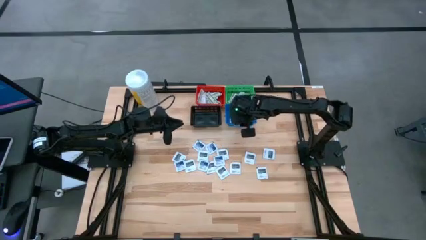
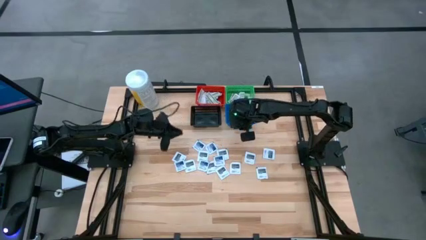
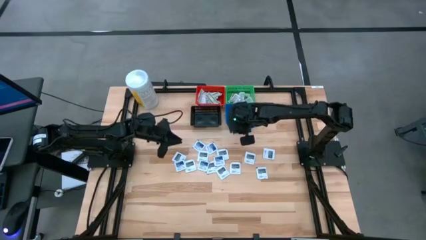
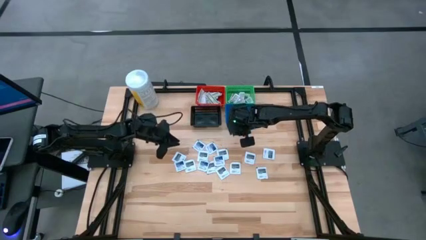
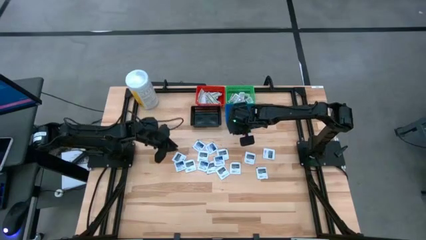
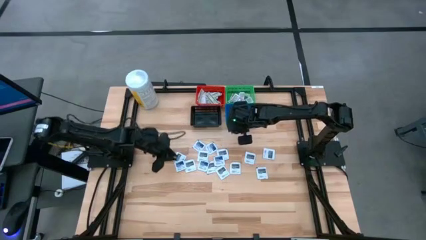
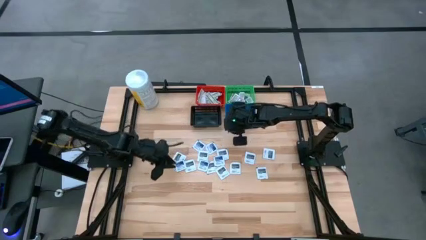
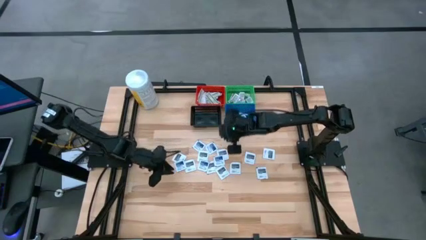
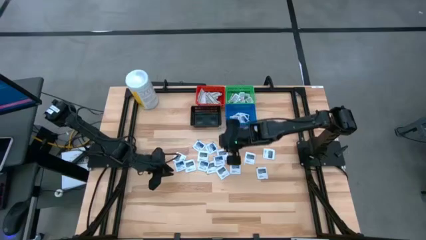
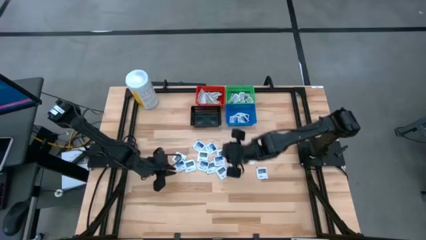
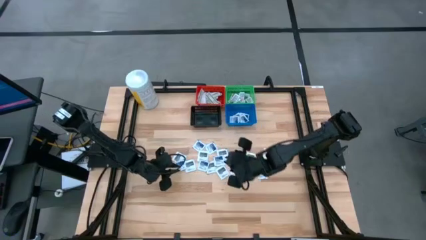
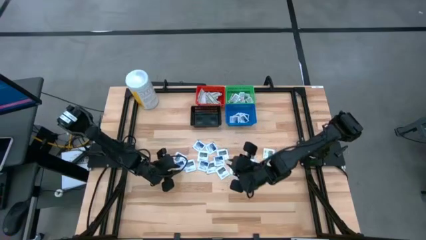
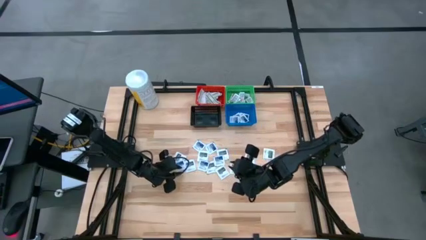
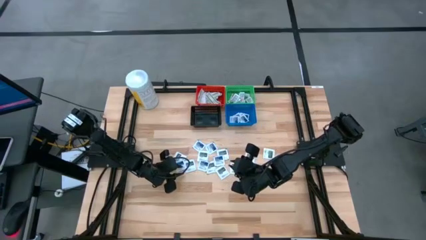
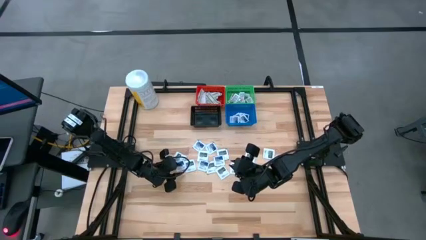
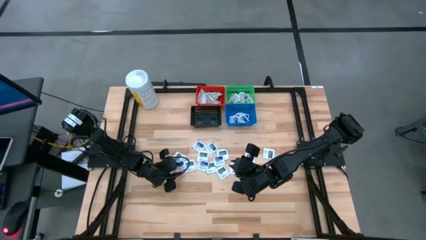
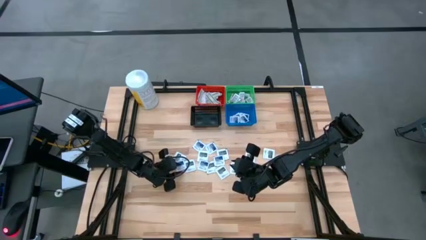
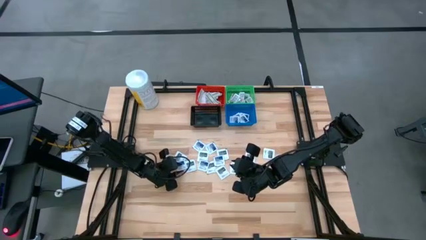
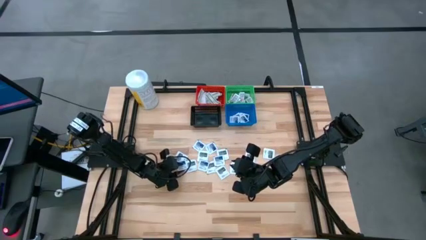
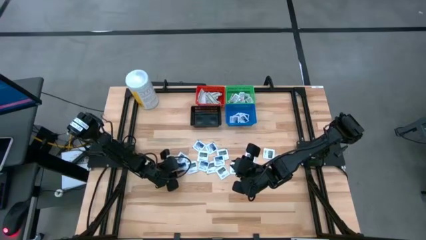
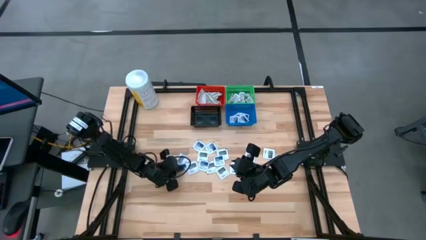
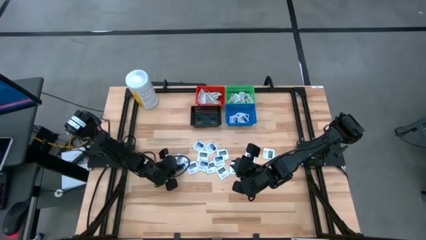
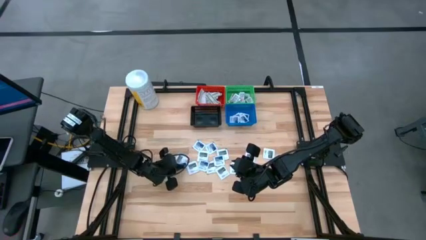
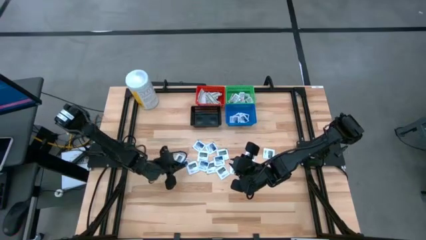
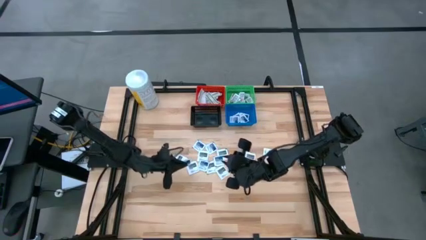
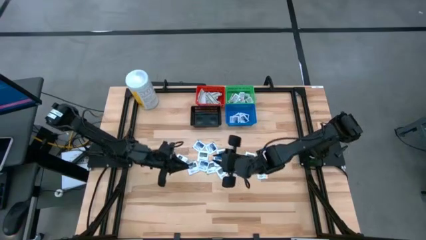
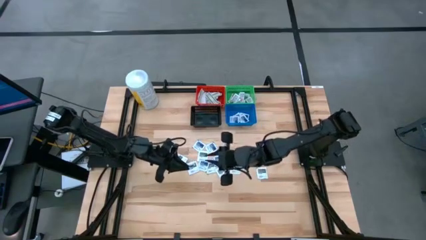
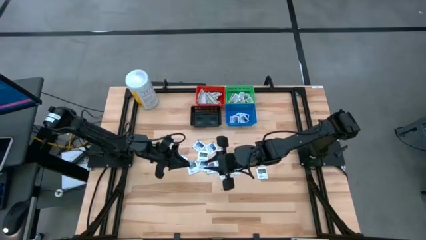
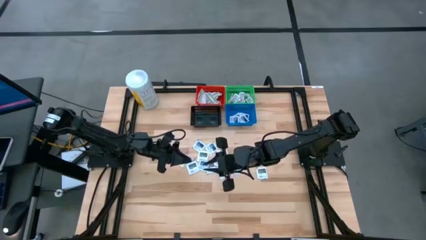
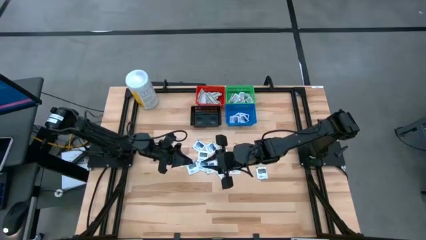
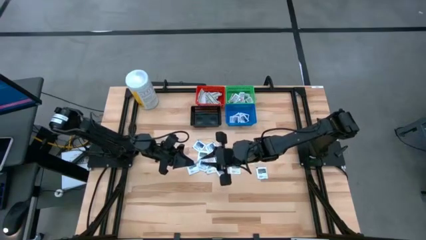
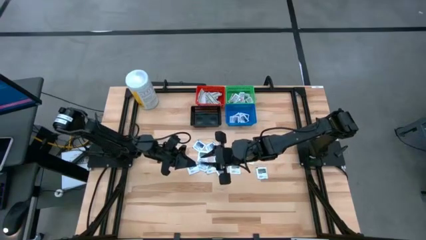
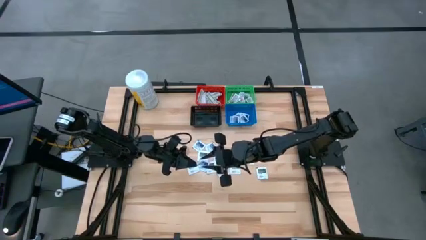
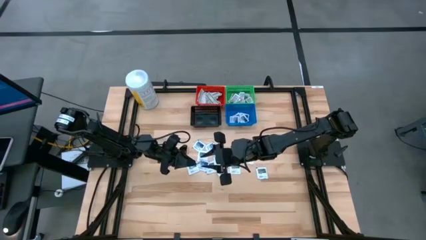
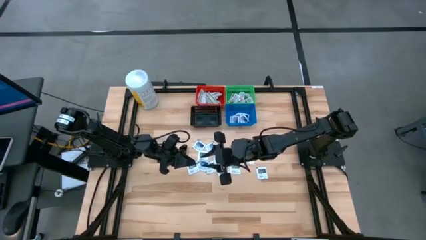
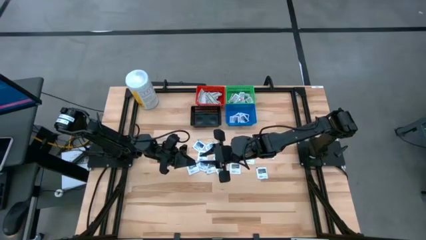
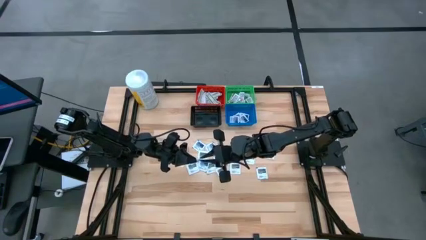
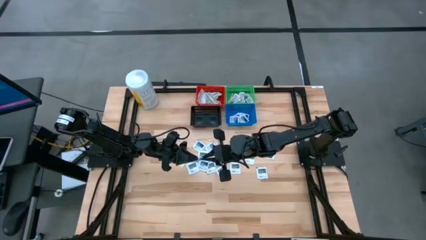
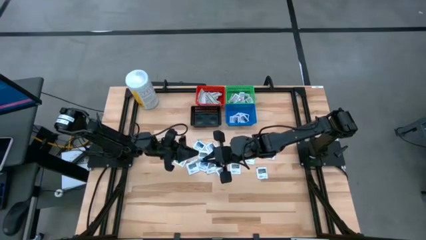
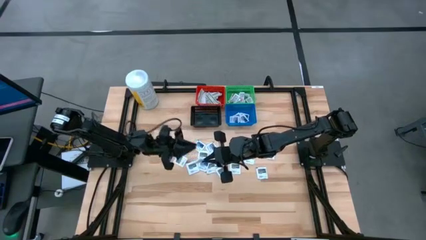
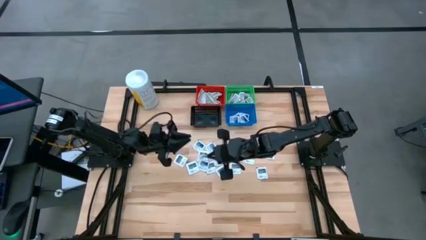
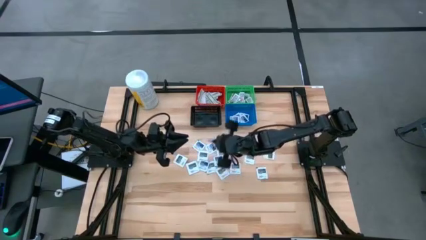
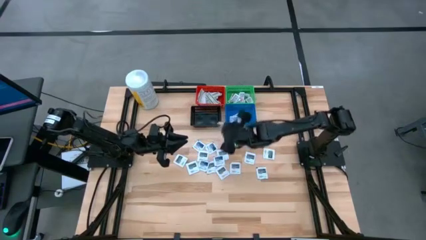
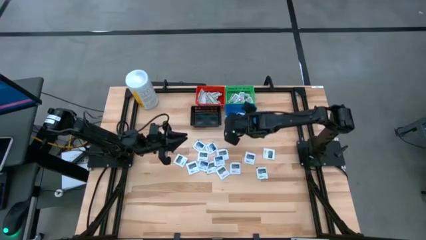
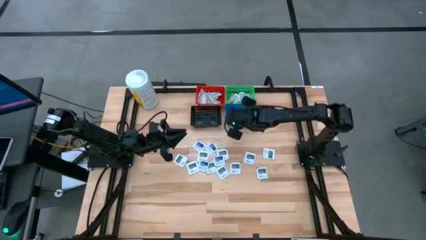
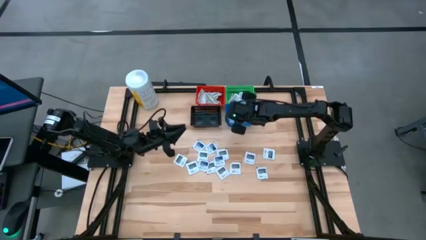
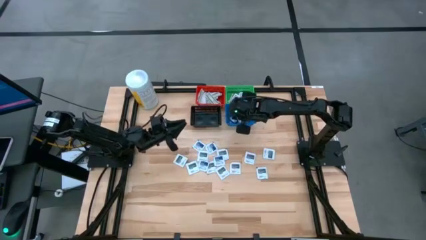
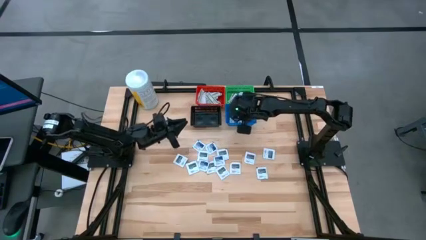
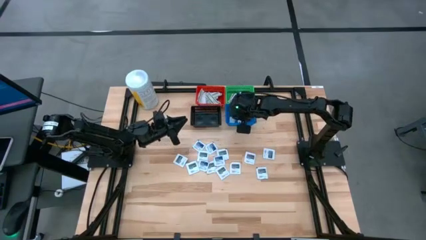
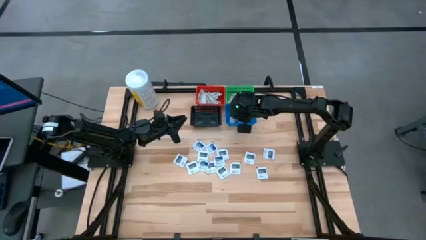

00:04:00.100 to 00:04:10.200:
Task: Pick & Place First Aid Supplies
Put the alcohol pad into the blue basket

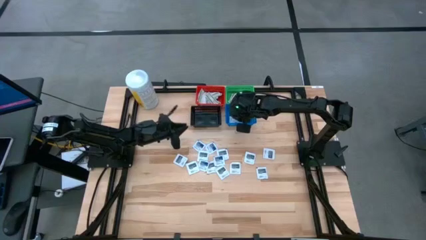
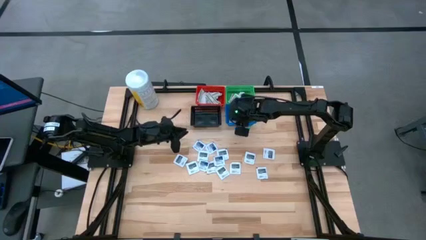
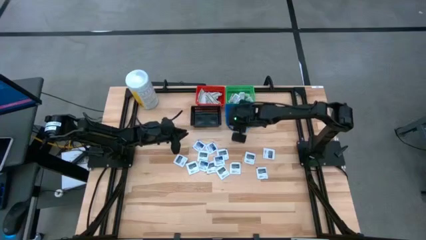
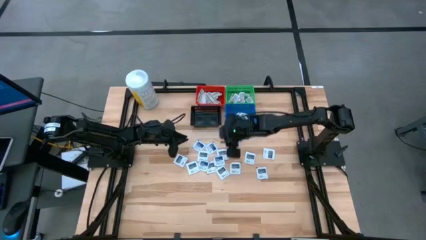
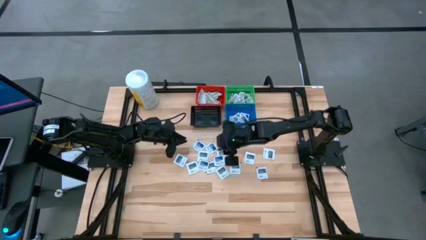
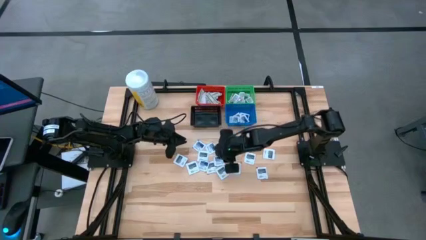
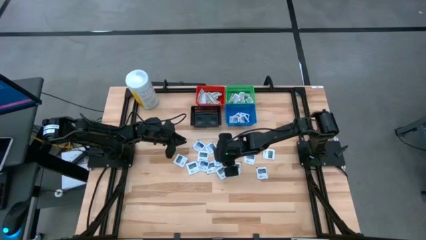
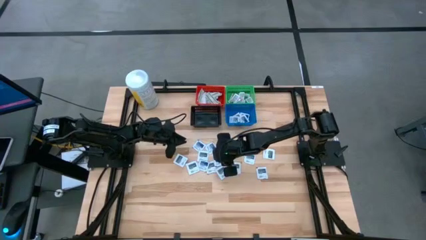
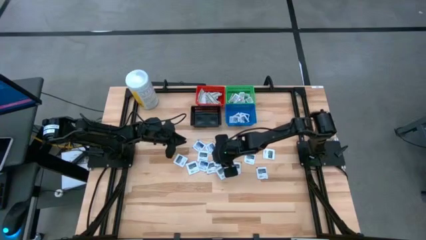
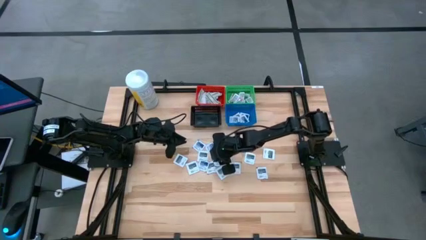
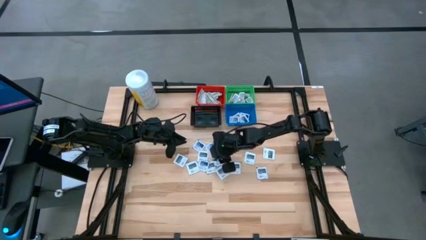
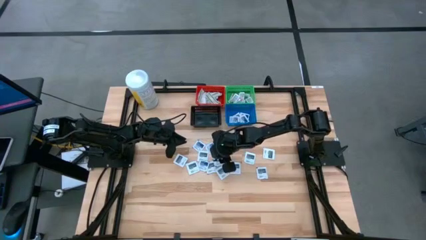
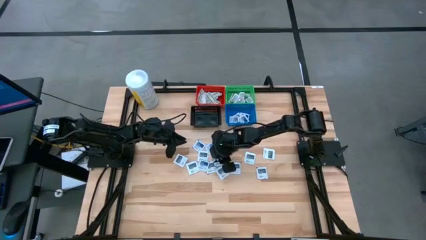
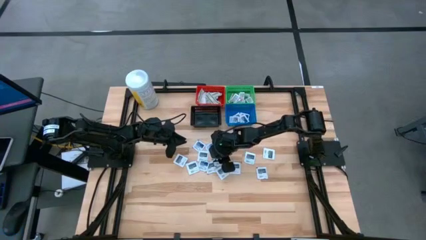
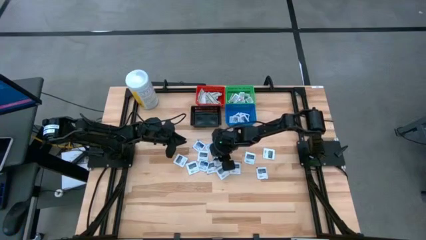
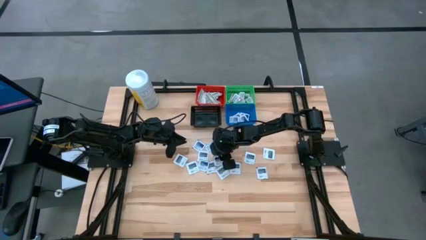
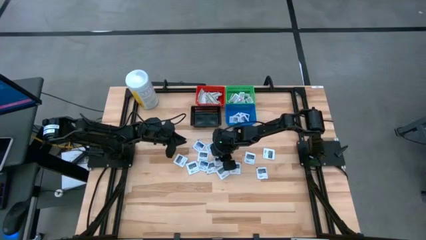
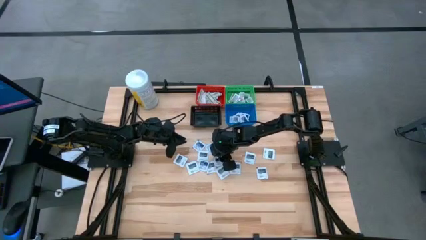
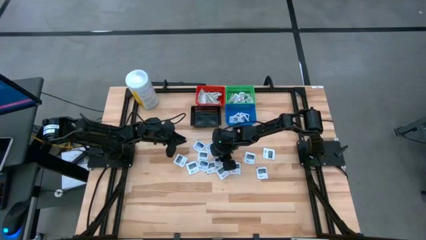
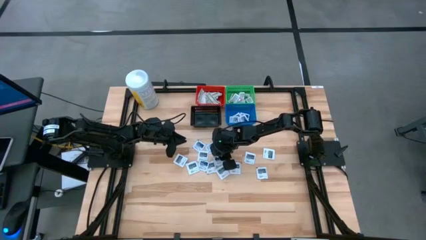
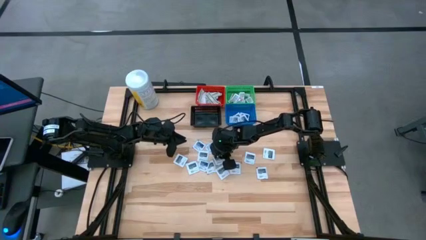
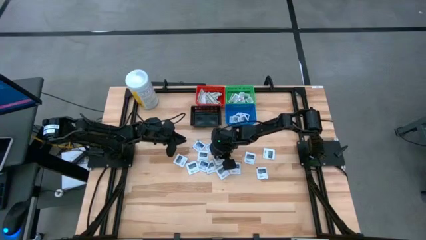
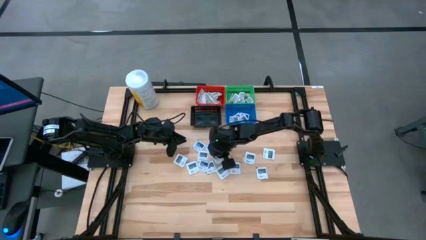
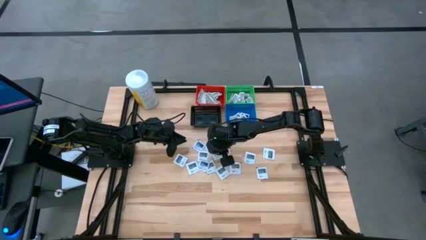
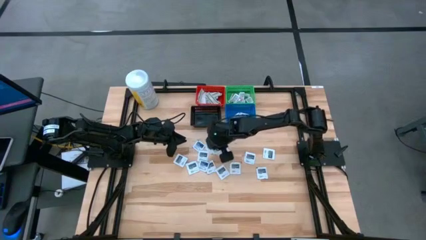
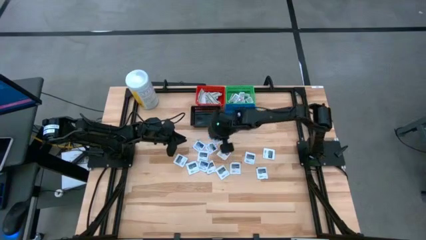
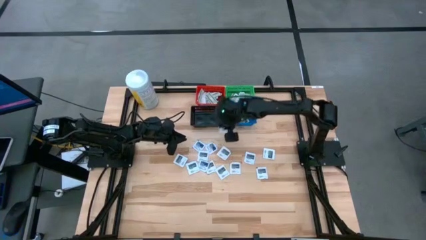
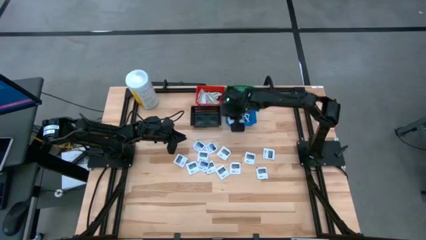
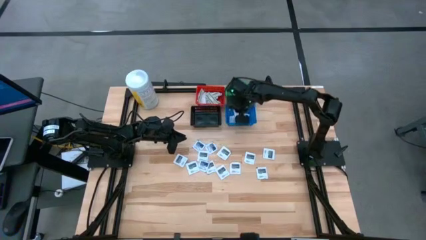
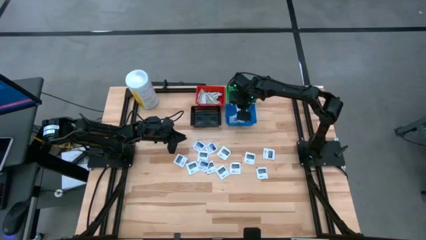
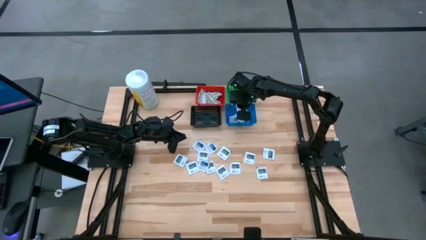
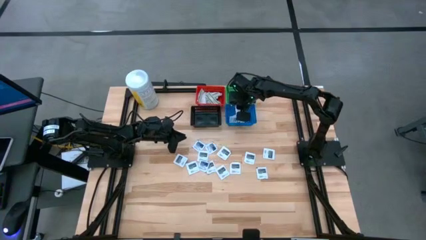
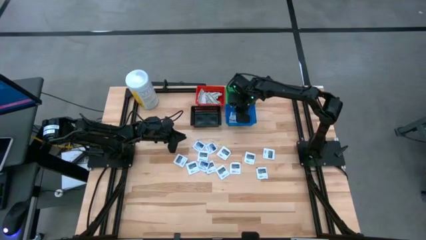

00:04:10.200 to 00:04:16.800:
Put the alcohol pad into the blue basket
